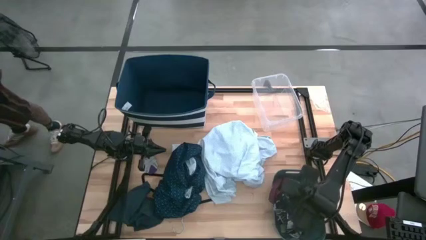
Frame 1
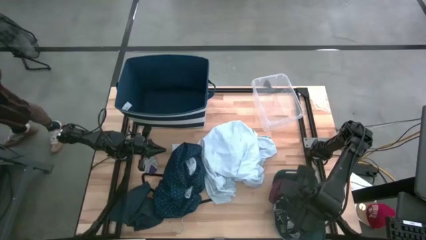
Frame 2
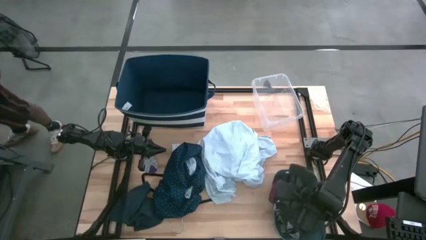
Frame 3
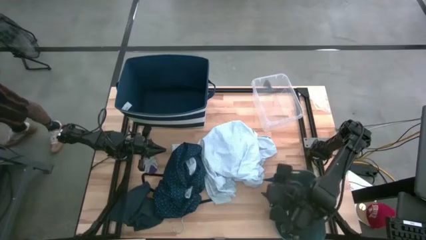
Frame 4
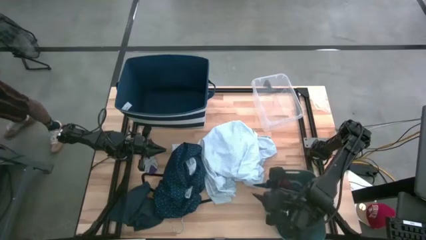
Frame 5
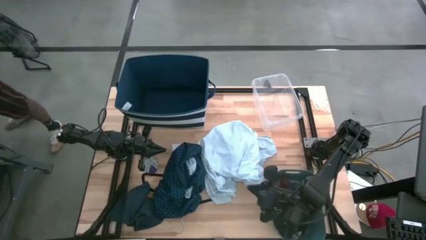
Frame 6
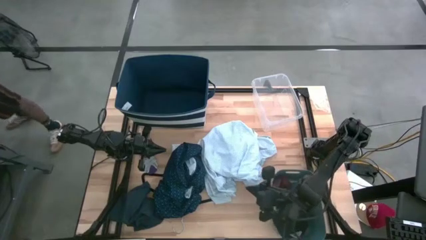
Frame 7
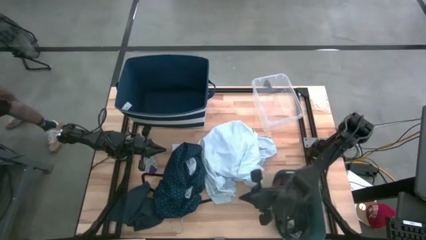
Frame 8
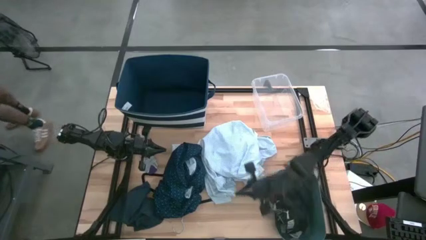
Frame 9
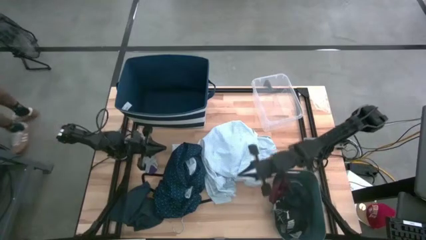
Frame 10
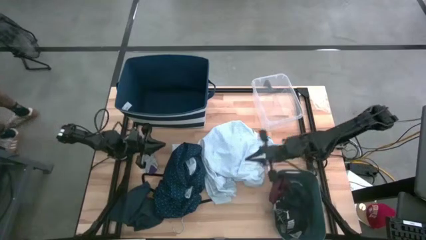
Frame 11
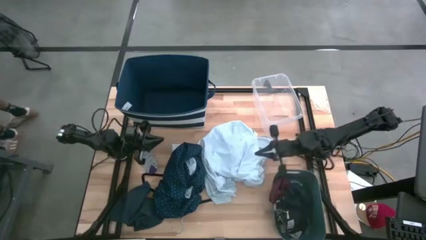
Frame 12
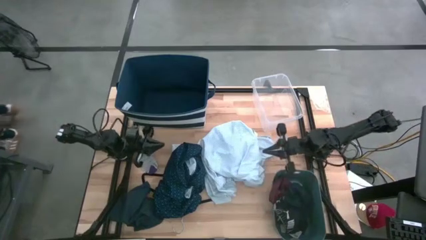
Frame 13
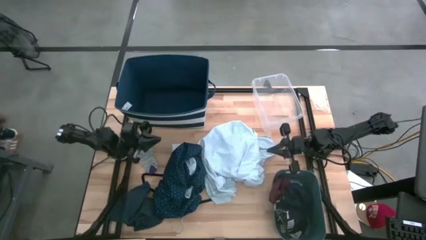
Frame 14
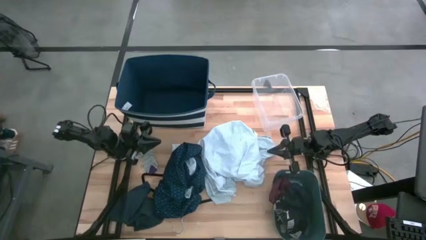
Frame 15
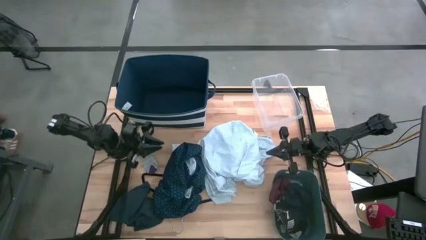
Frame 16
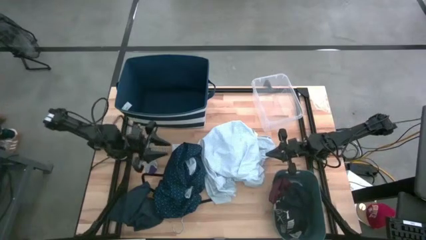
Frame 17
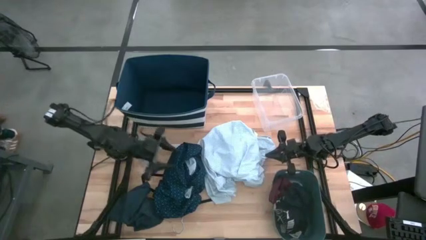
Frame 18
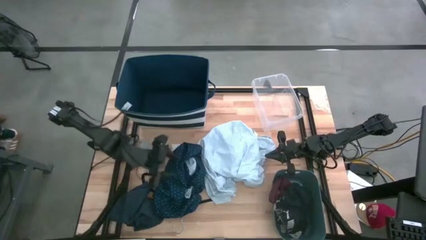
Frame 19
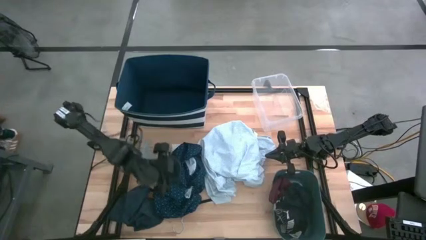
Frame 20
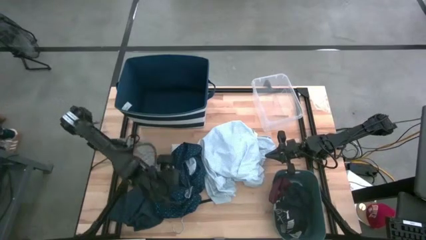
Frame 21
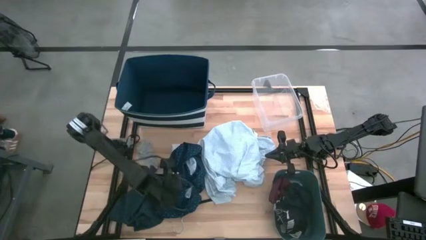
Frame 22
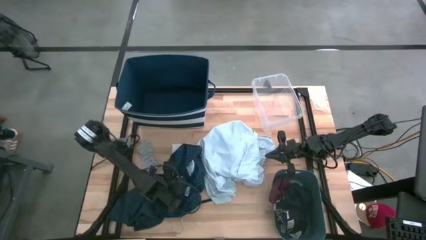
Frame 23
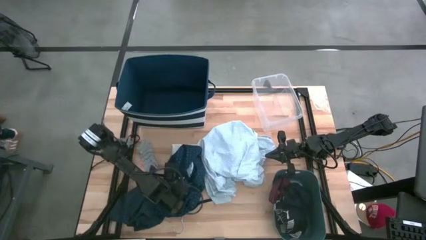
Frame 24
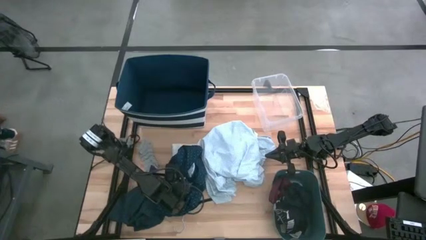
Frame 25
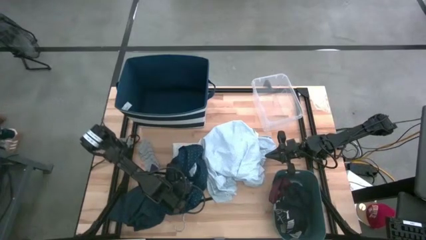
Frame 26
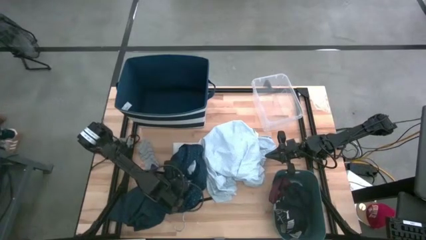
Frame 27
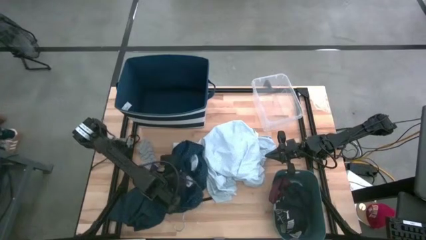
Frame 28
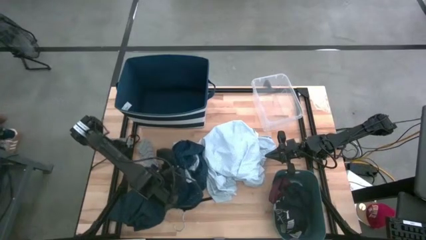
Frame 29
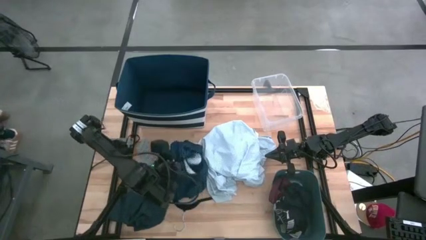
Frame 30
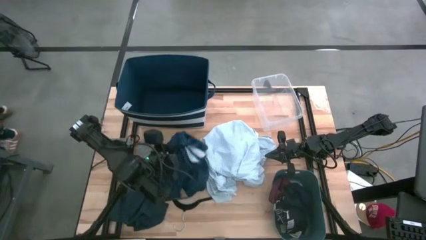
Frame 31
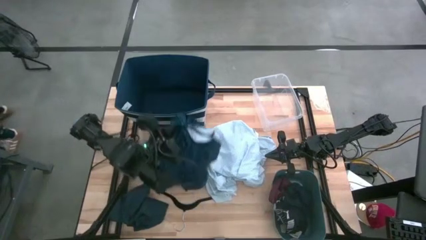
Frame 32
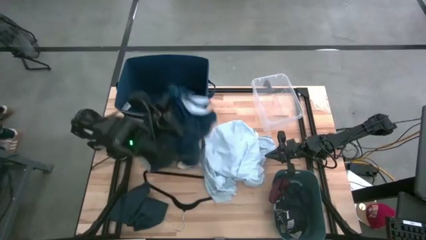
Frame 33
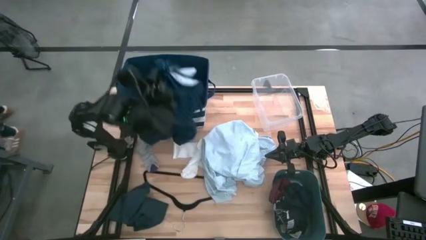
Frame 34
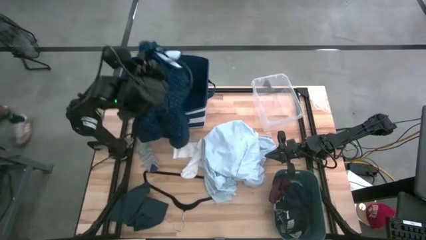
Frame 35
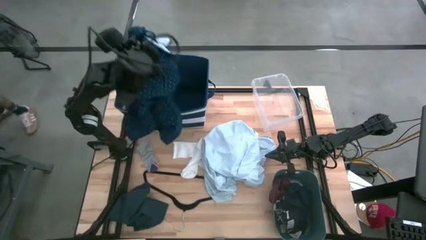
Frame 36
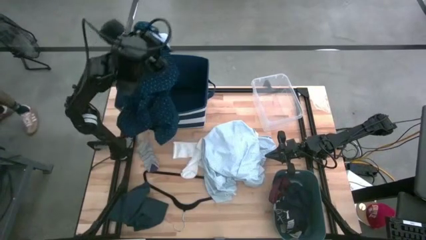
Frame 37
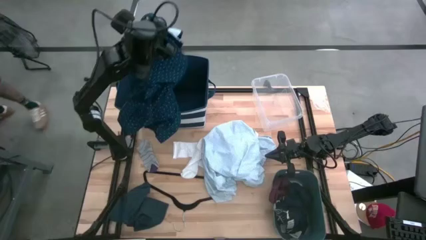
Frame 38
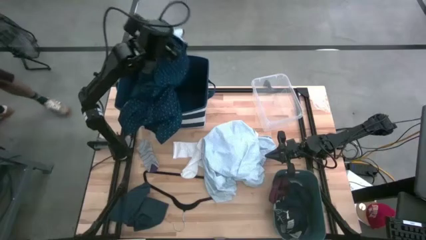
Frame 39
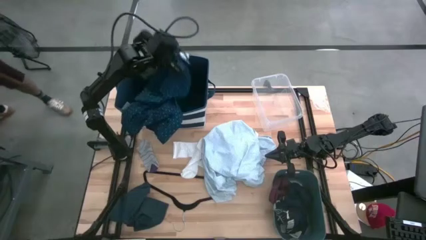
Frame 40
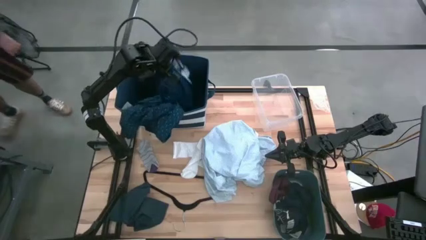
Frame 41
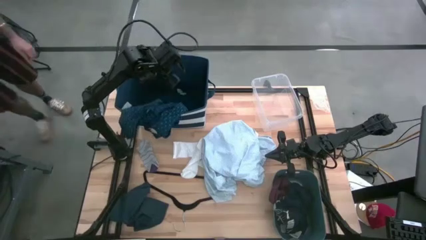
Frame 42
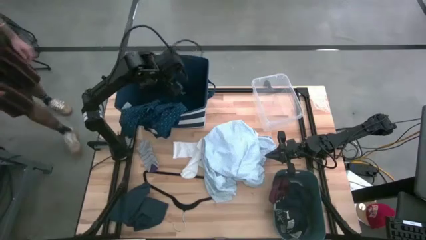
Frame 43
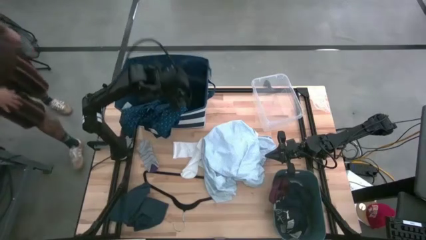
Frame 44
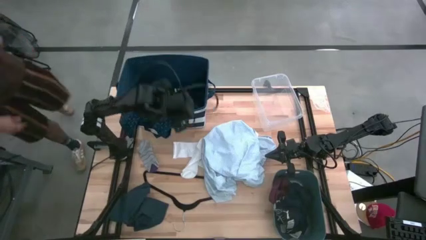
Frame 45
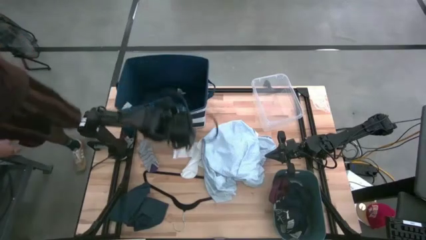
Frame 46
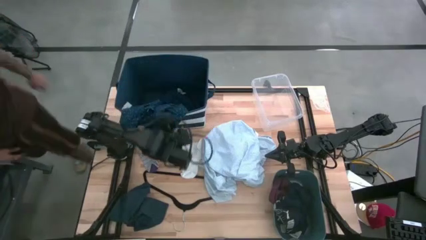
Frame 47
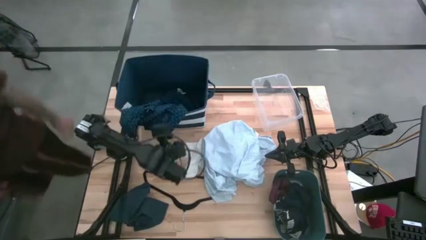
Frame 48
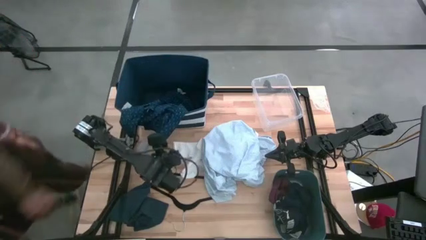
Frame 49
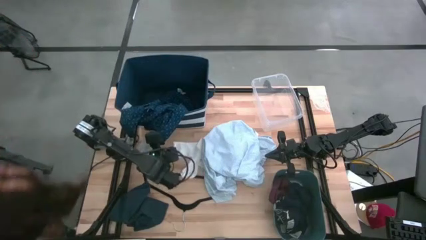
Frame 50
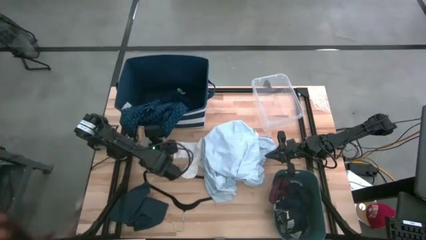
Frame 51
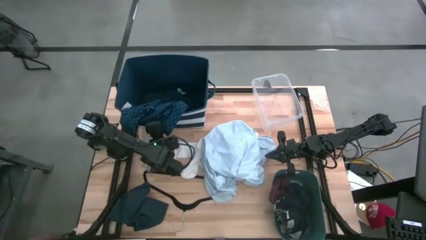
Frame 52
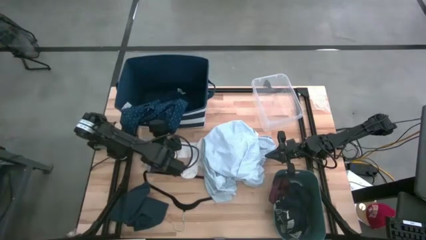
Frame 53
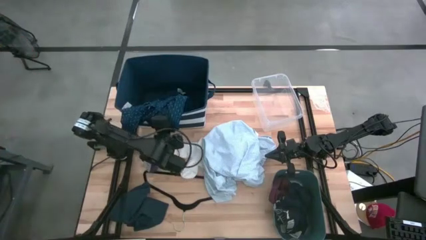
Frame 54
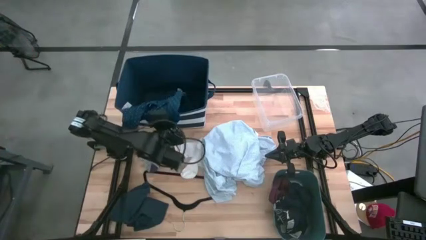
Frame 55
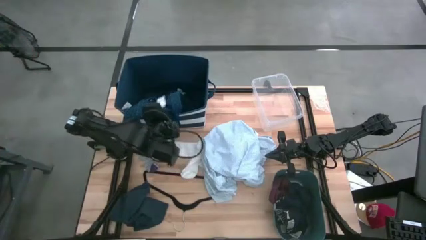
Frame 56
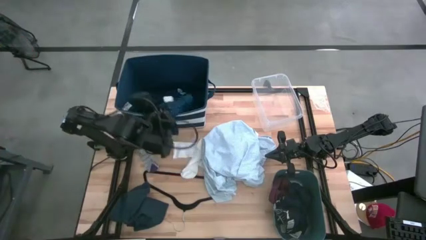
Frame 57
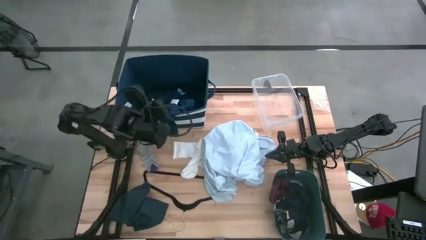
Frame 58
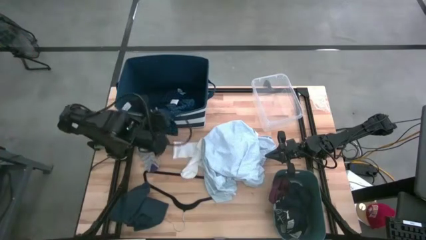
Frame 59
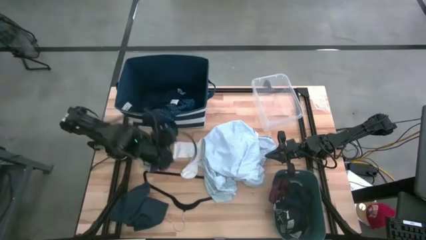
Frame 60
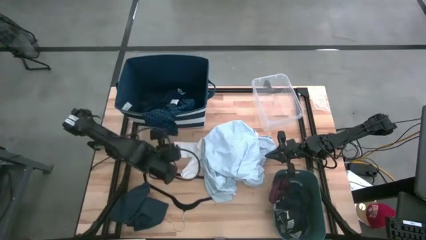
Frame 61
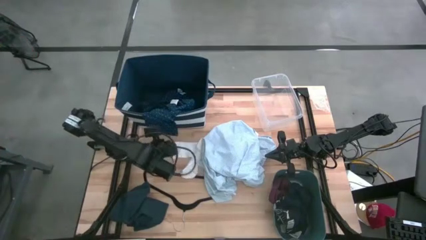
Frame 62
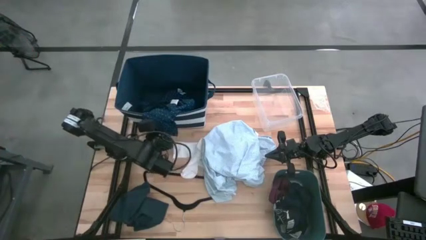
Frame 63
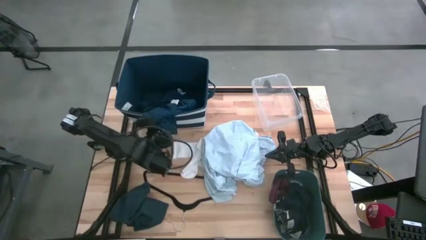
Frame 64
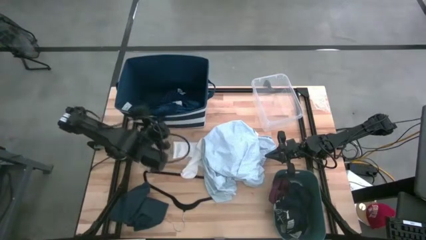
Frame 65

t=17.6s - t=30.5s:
Task: Pick & Place Cloths
Put the blue shirt into the laundry organizer

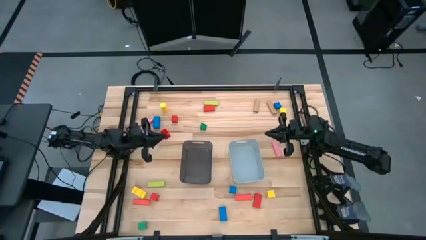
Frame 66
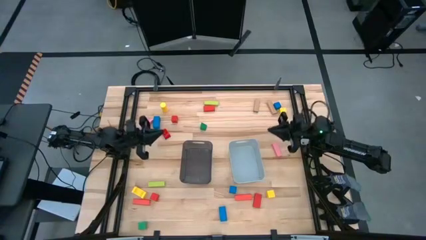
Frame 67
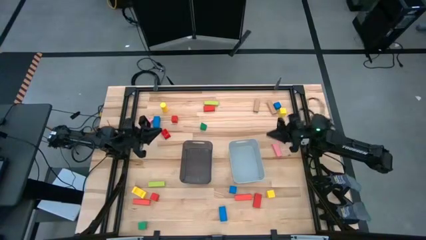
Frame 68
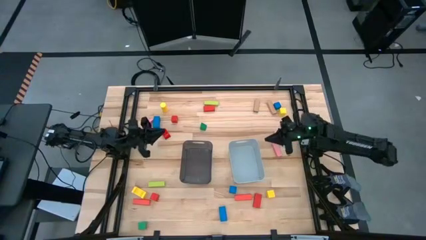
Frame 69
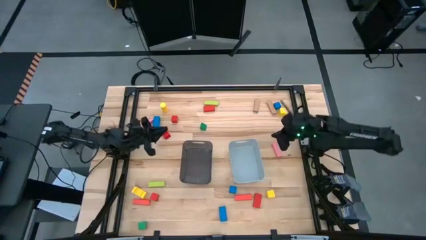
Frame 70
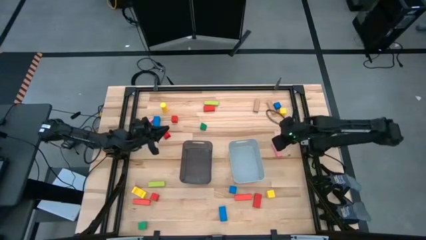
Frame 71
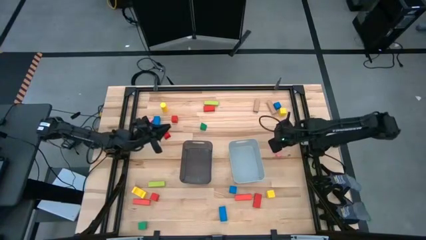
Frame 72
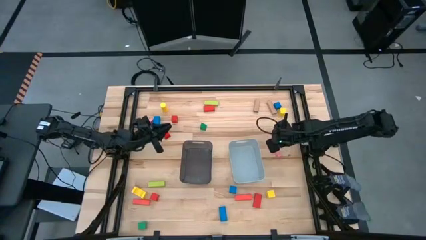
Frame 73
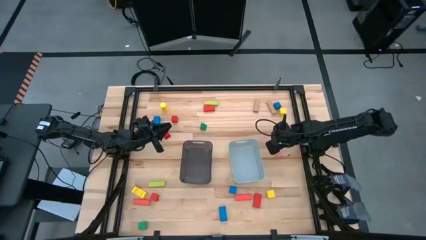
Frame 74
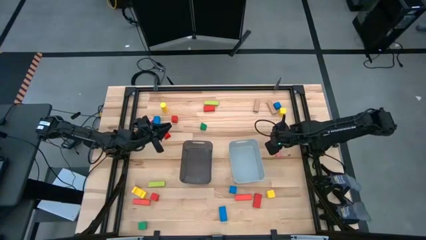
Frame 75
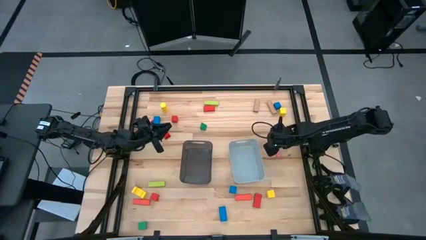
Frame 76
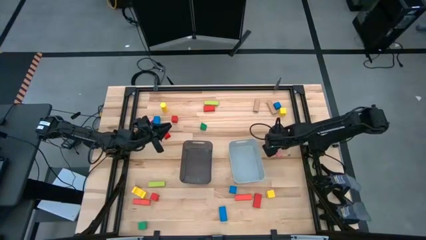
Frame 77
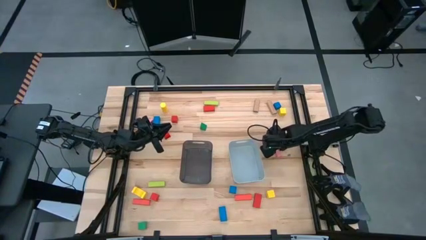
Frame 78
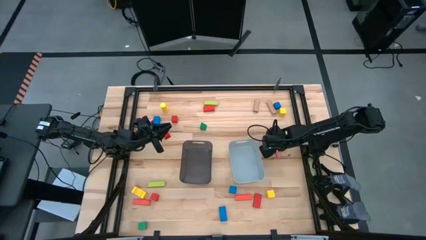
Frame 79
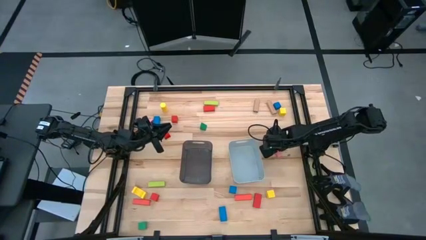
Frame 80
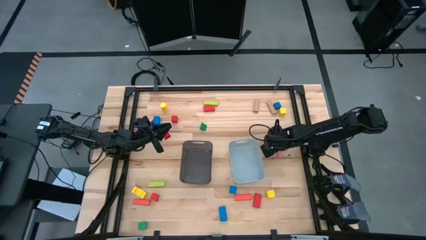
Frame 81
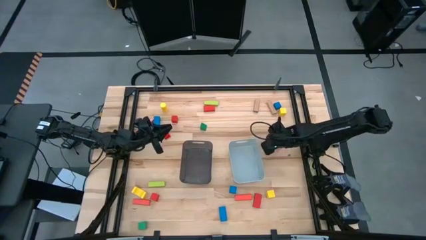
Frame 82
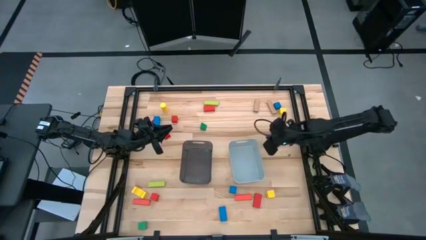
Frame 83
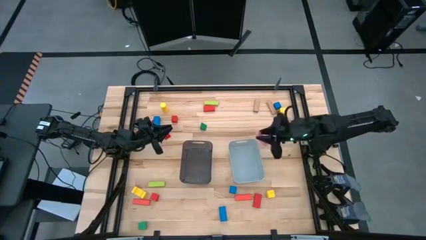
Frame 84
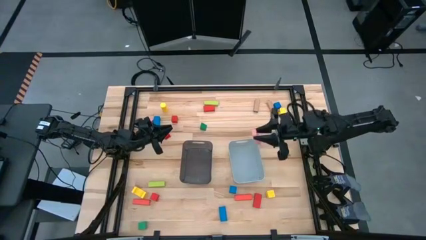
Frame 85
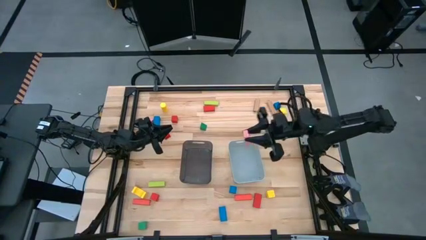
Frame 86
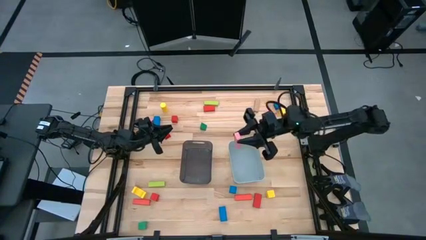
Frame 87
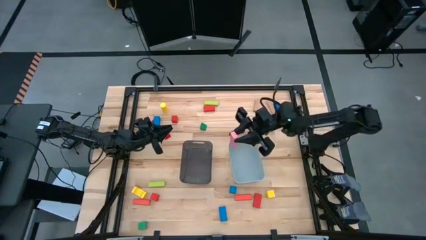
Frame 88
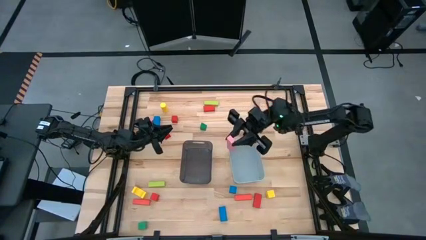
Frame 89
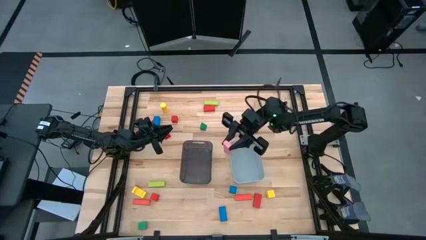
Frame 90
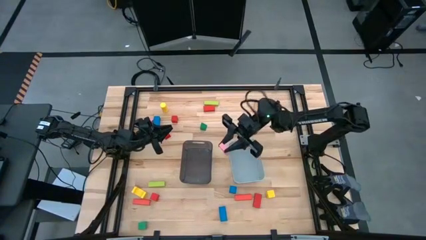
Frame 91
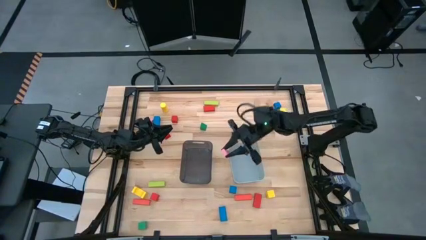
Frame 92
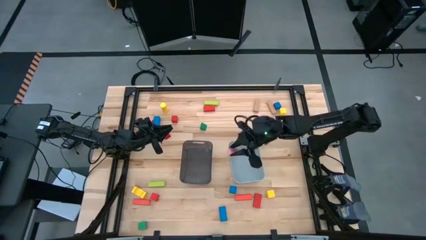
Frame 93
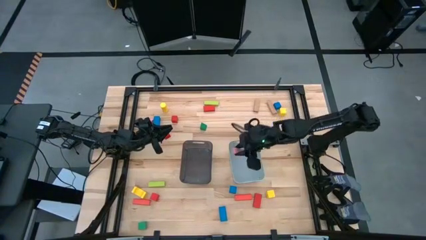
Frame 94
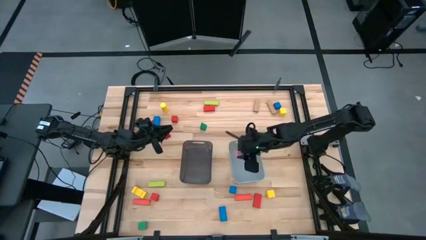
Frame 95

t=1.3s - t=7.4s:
Task: Sort blocks by size
Put the right large pink block into the gray bin
